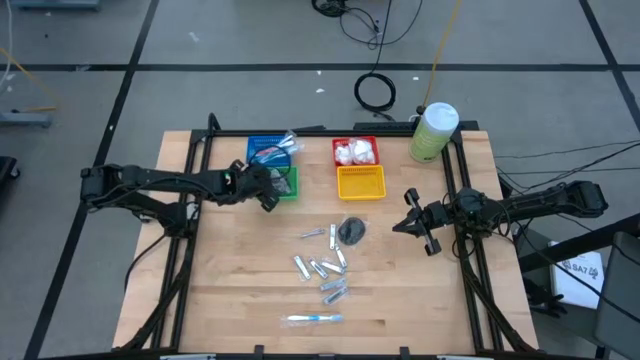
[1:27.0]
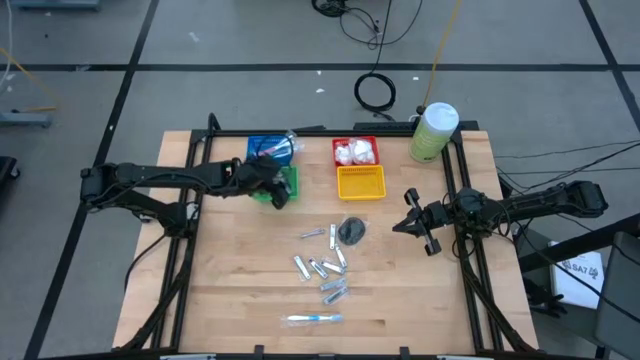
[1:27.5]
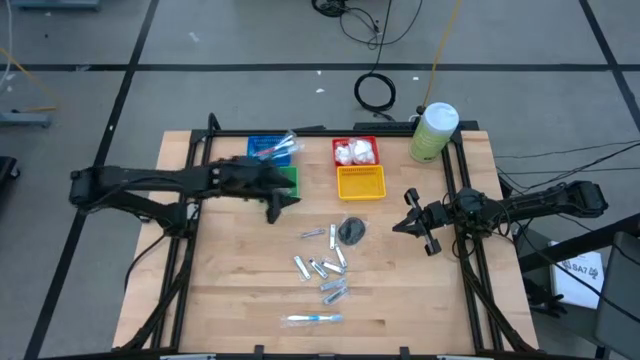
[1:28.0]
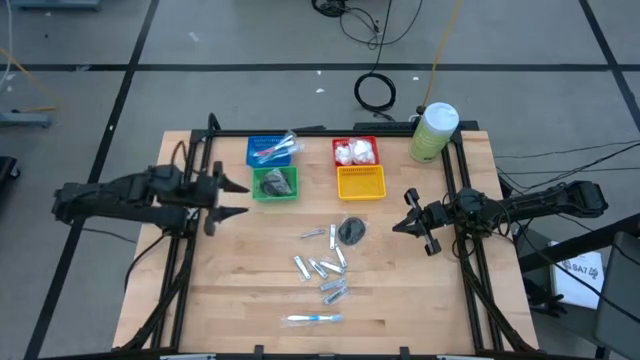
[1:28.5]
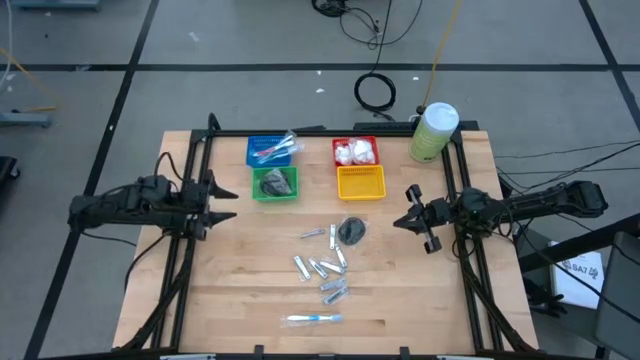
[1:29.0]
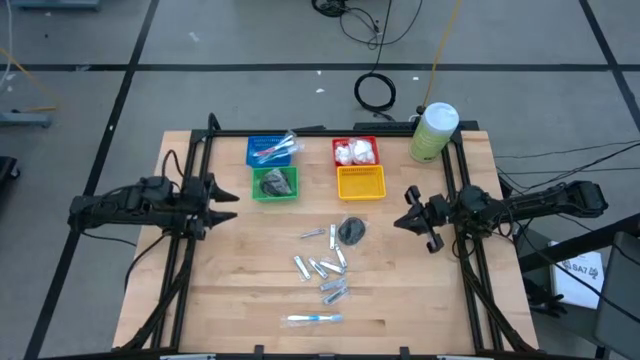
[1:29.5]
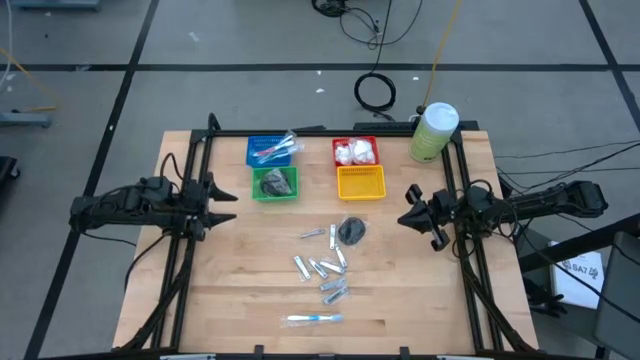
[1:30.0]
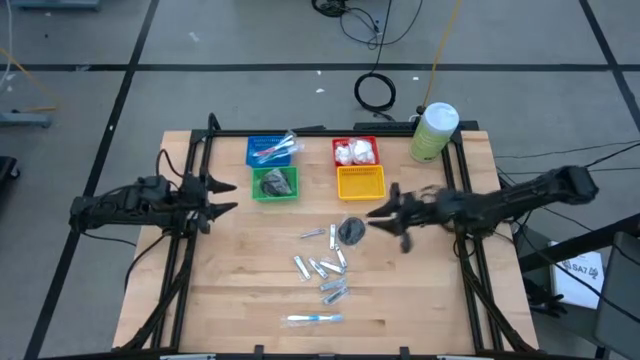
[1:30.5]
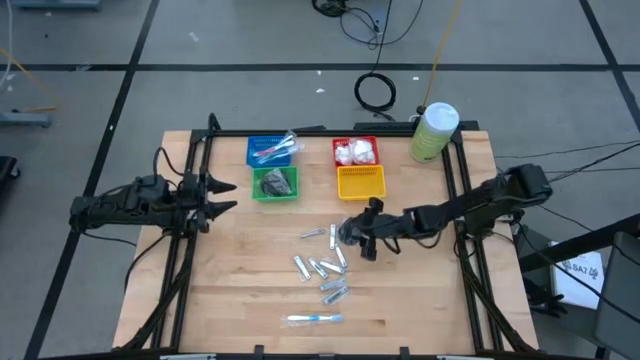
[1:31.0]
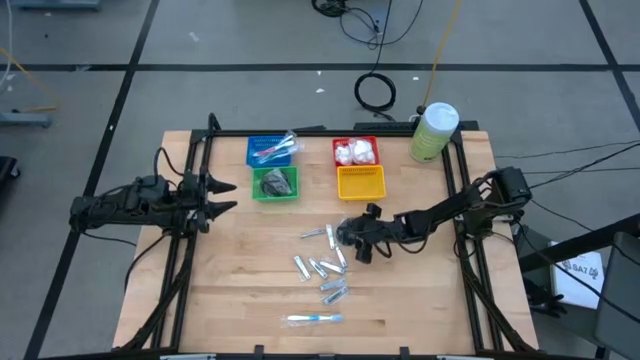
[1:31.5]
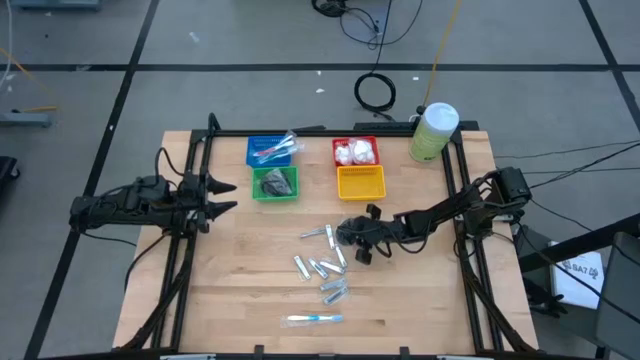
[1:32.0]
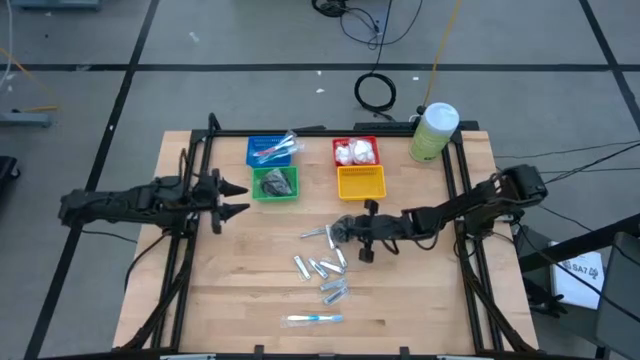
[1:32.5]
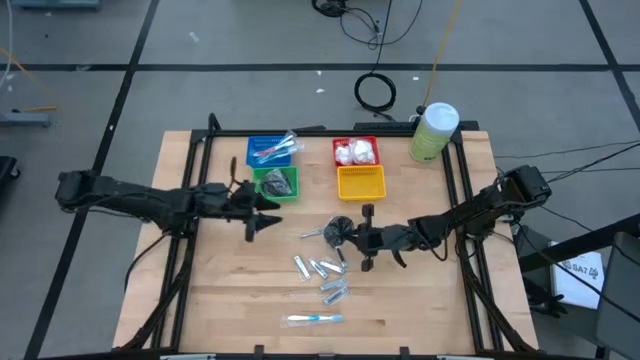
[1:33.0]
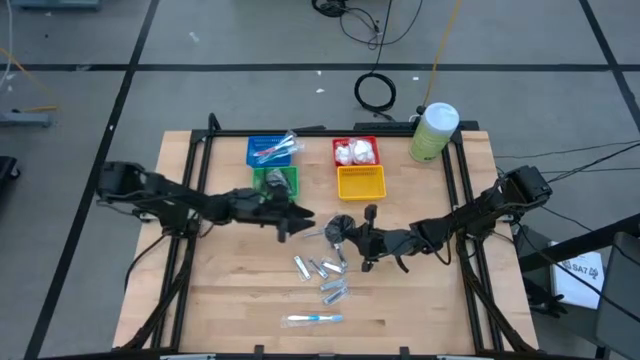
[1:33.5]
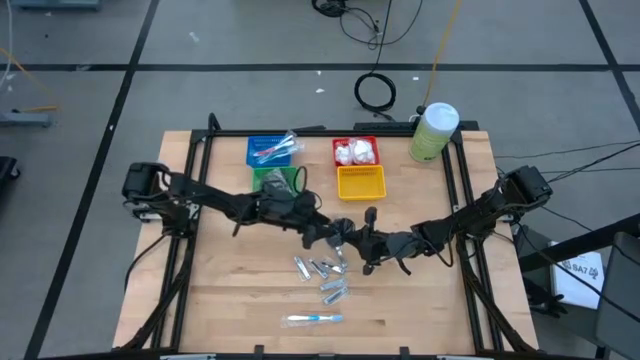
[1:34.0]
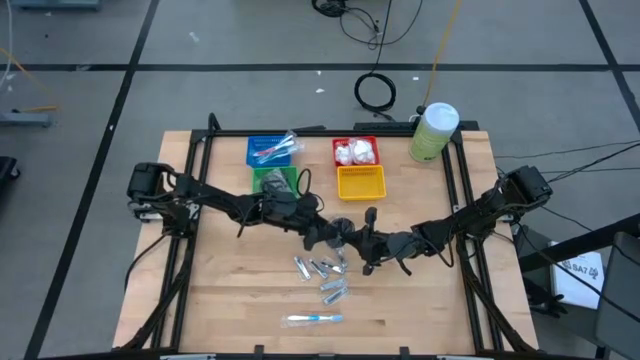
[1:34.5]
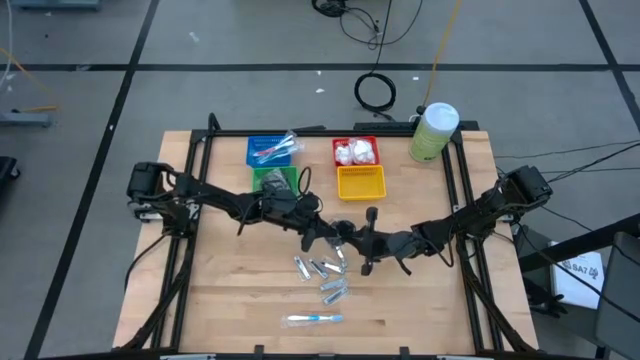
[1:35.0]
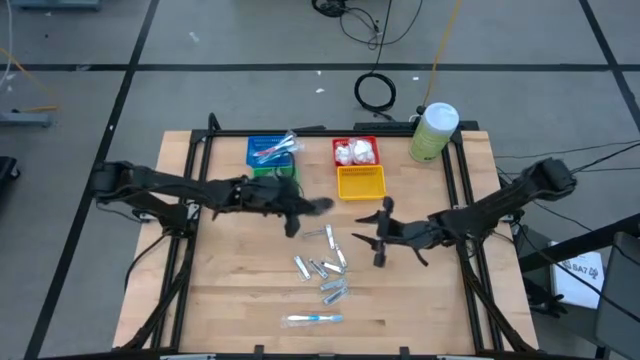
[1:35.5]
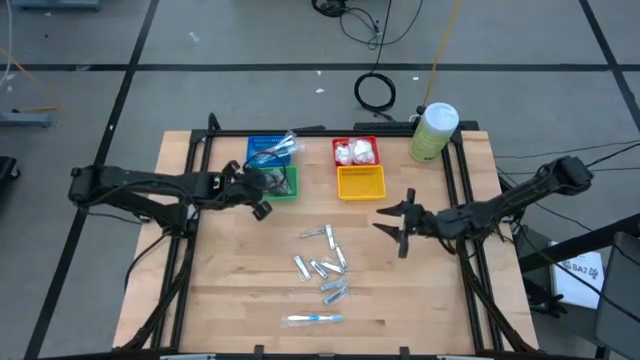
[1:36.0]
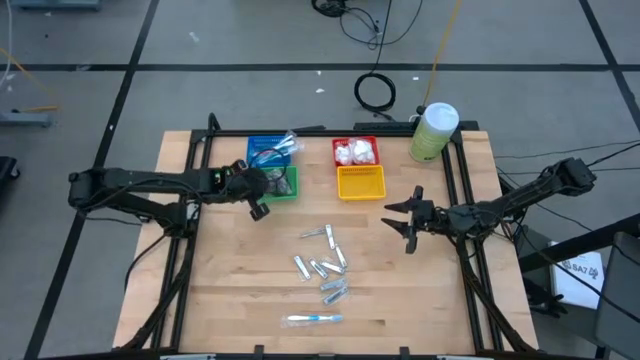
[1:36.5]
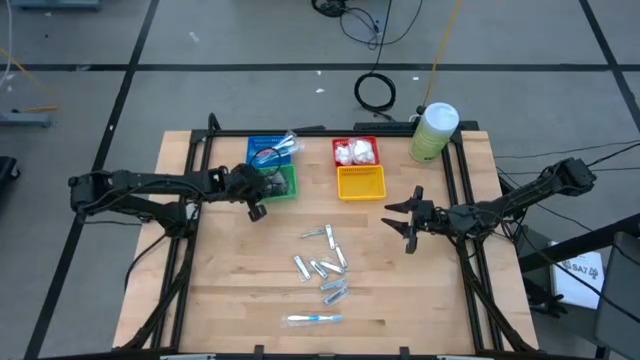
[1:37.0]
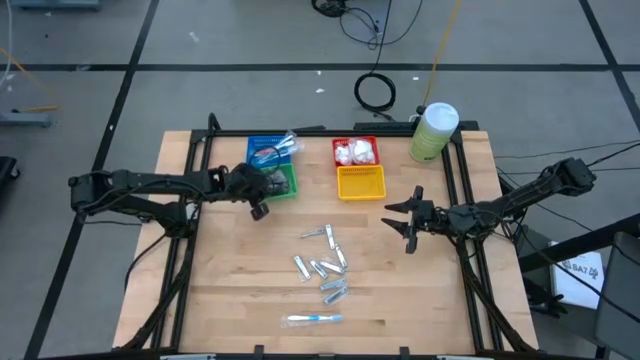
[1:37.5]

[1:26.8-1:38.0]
Task: Pick & Place Travel size toiletries
Put the black hair brush into the green bin

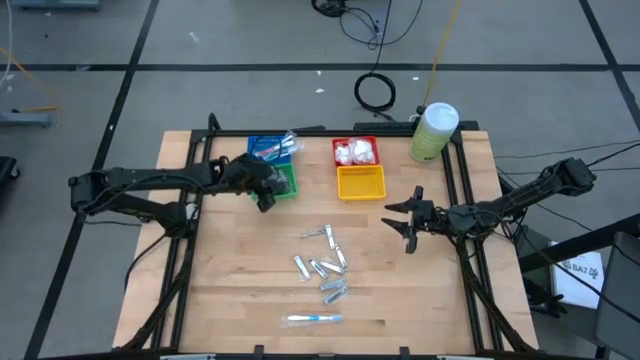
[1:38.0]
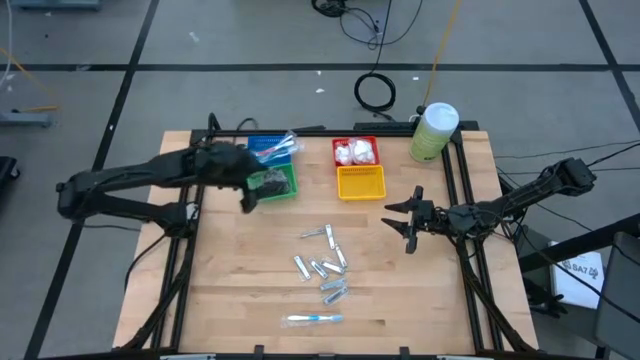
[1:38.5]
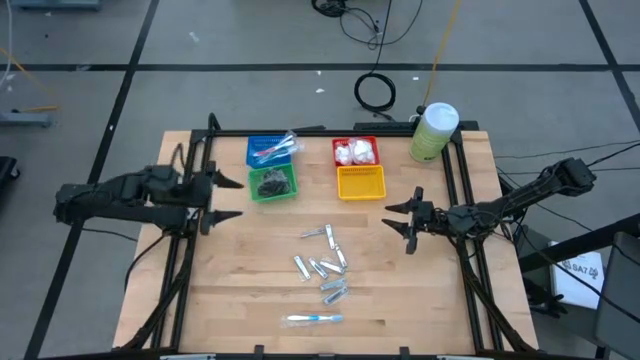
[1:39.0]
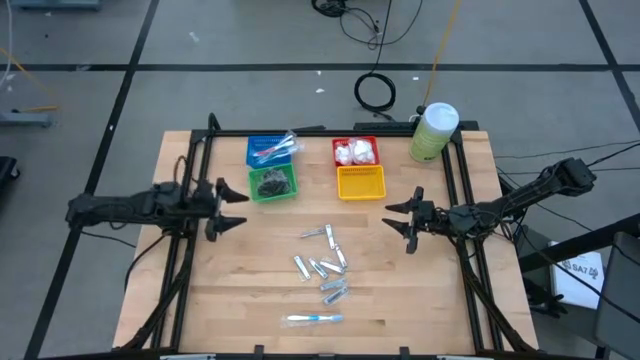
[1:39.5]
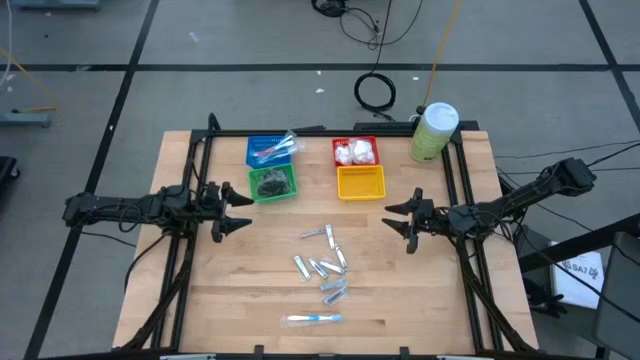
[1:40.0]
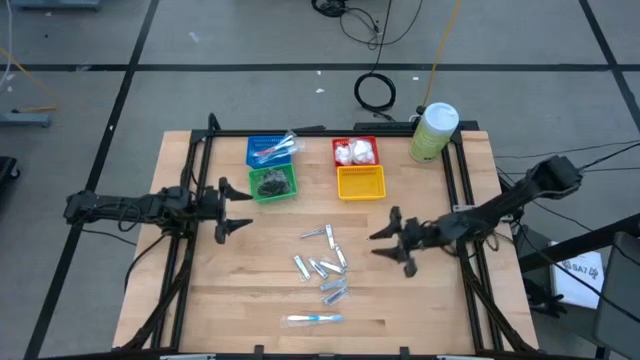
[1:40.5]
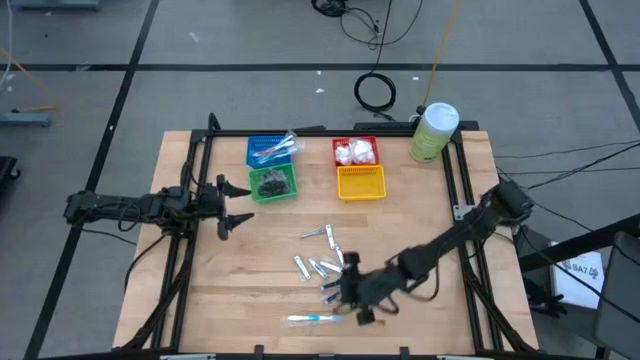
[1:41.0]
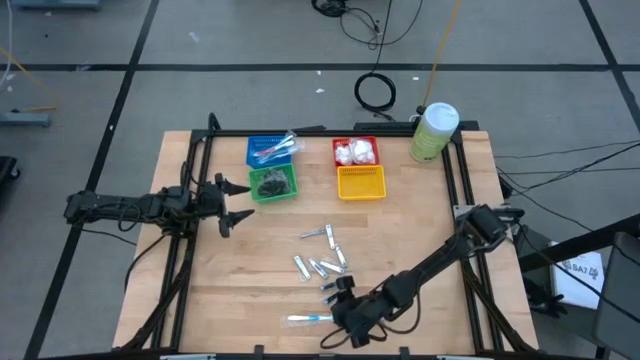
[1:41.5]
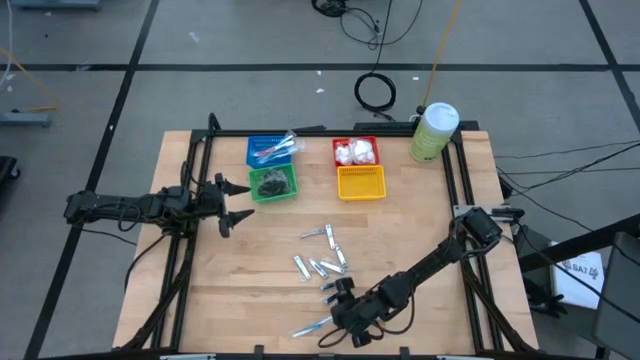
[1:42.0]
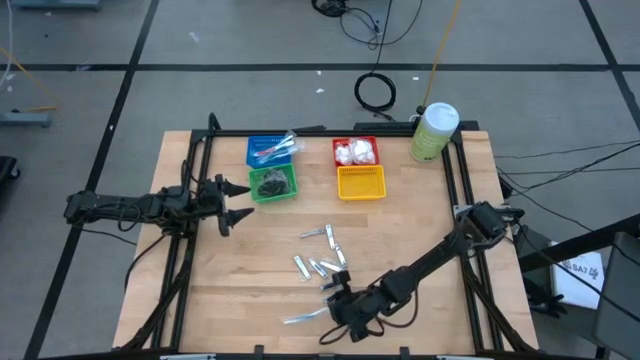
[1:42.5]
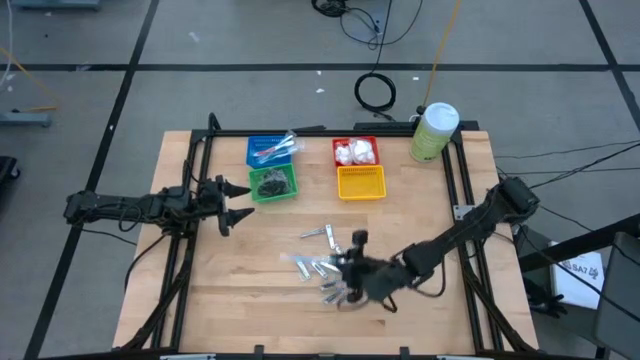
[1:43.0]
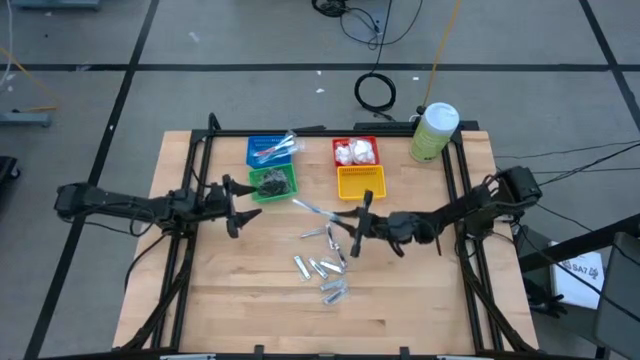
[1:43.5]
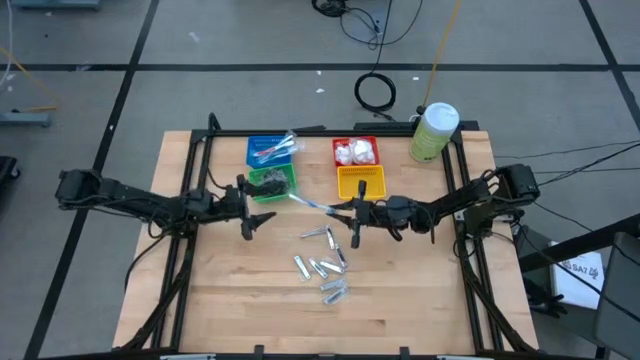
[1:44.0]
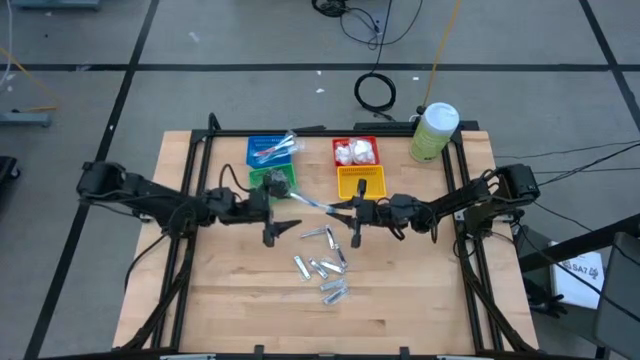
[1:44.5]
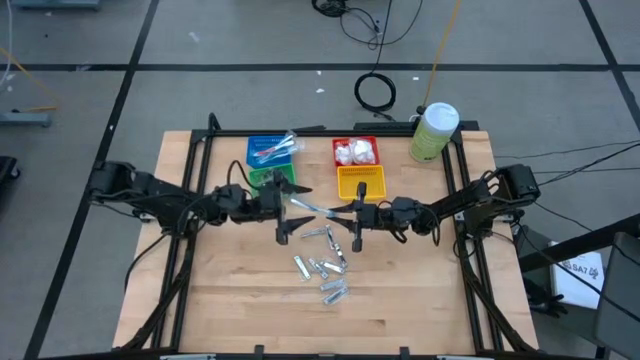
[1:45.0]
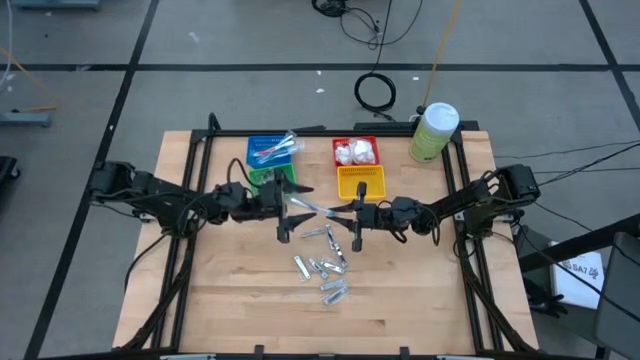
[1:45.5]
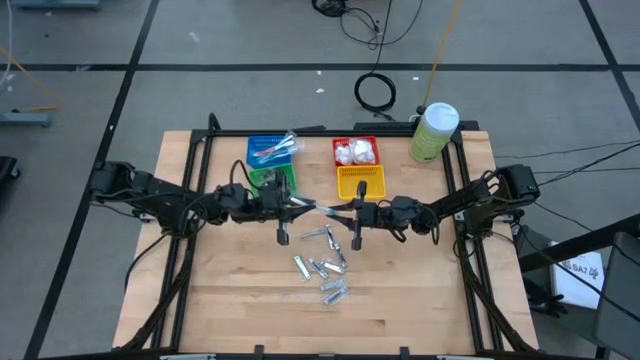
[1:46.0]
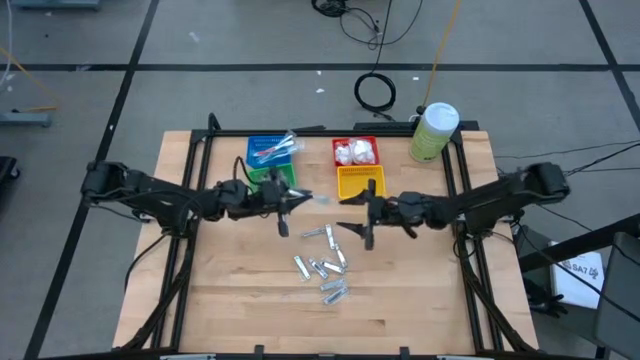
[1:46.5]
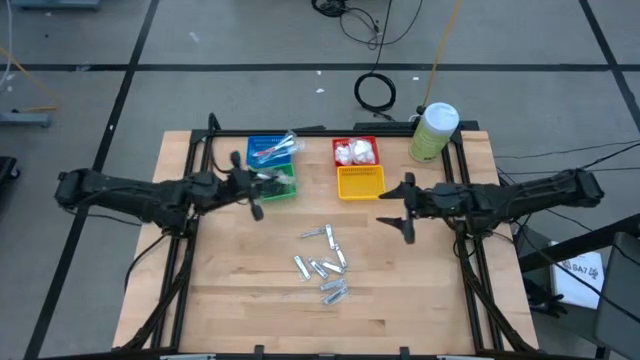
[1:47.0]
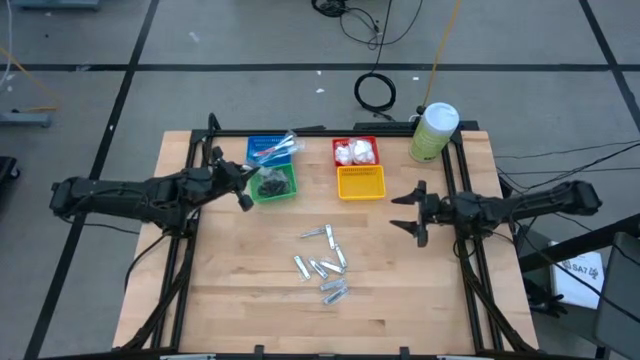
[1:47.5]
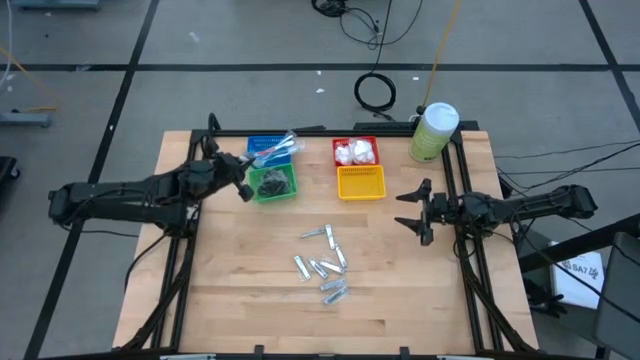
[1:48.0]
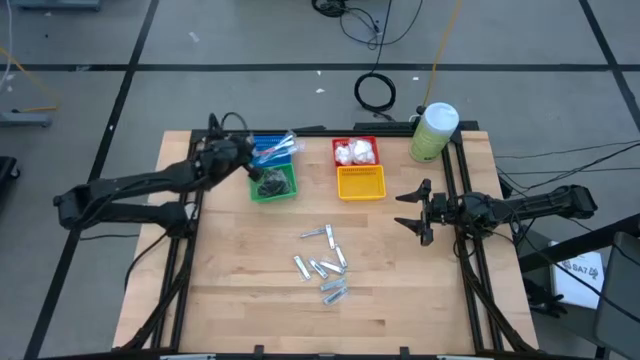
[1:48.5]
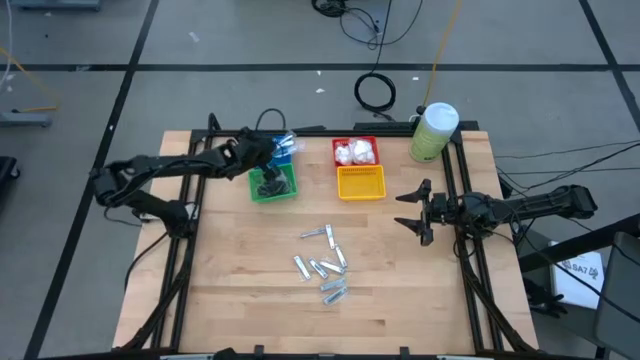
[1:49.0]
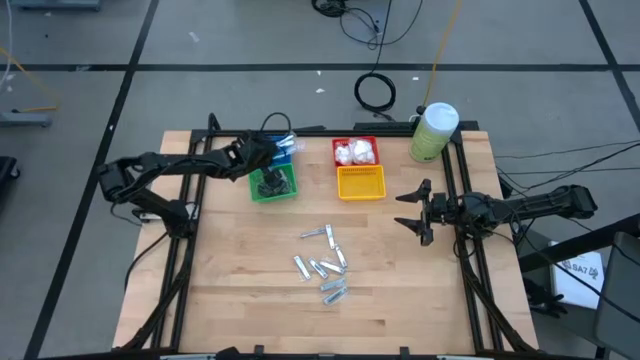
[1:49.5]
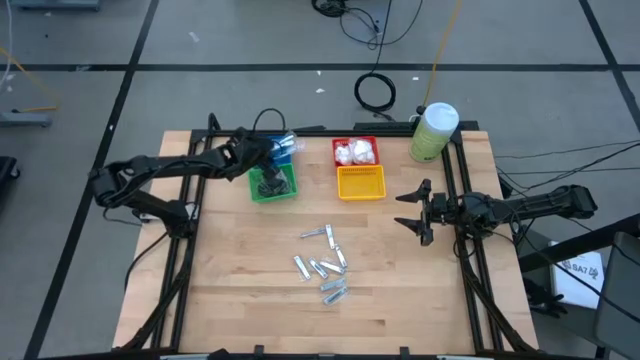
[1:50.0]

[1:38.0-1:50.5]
Put the blue toothbrush into the blue bin
